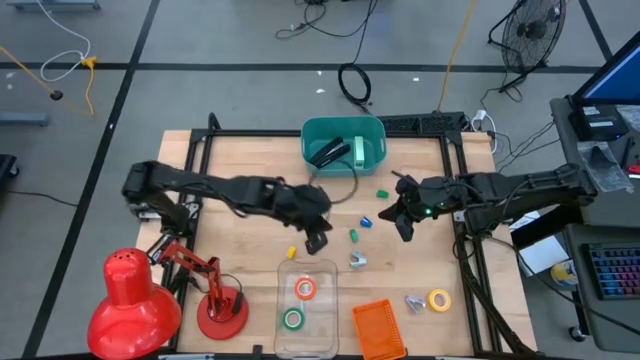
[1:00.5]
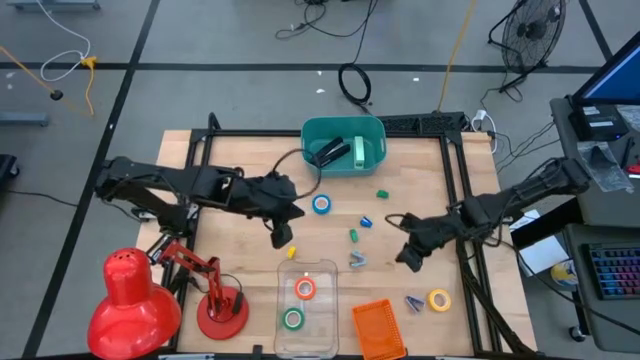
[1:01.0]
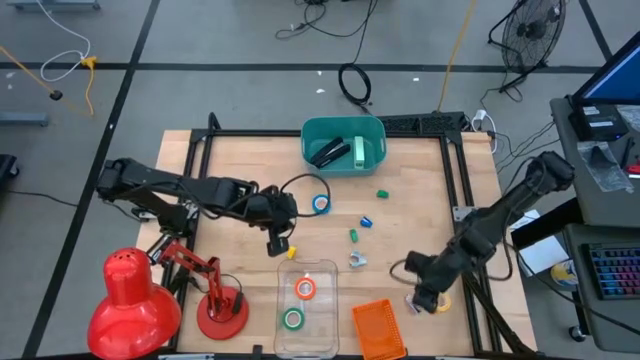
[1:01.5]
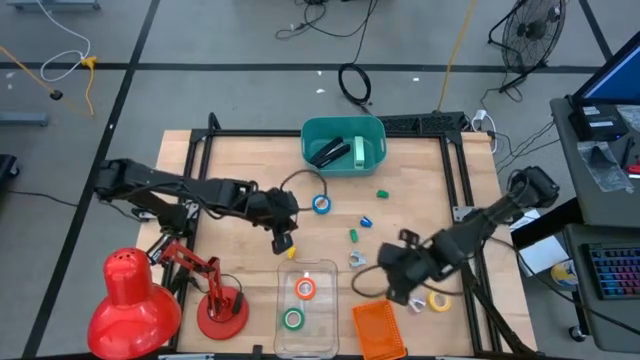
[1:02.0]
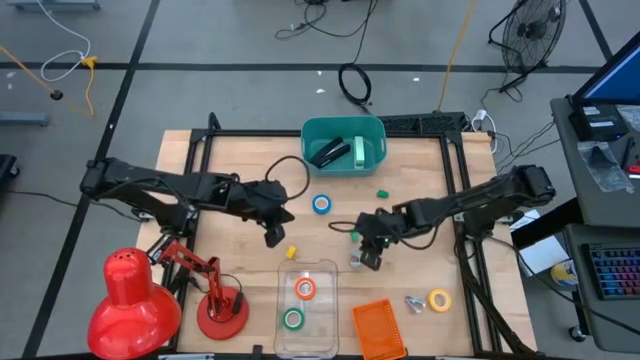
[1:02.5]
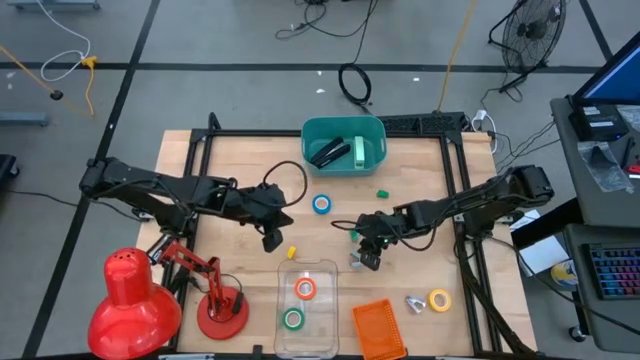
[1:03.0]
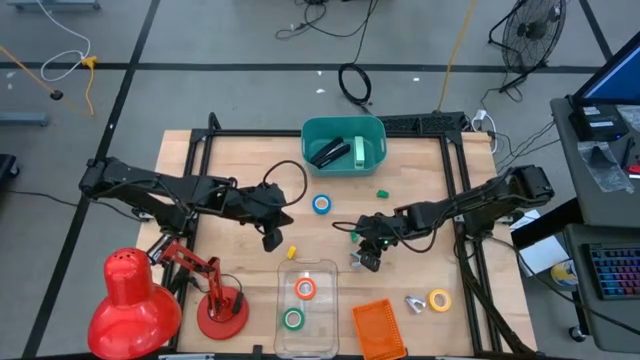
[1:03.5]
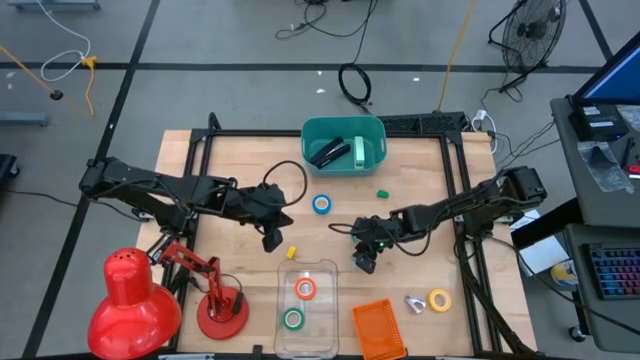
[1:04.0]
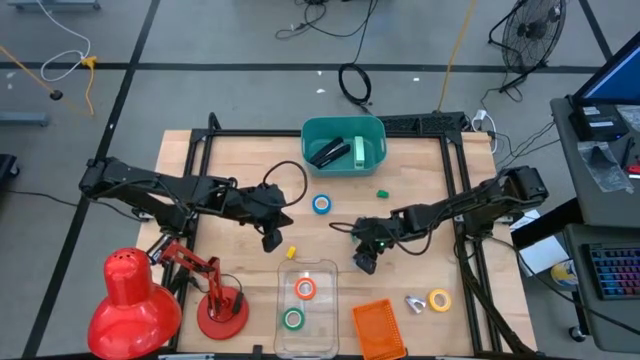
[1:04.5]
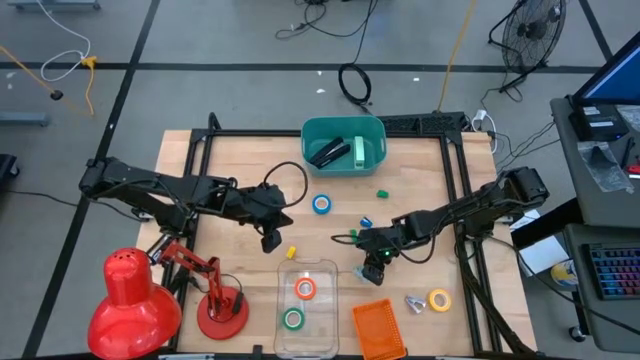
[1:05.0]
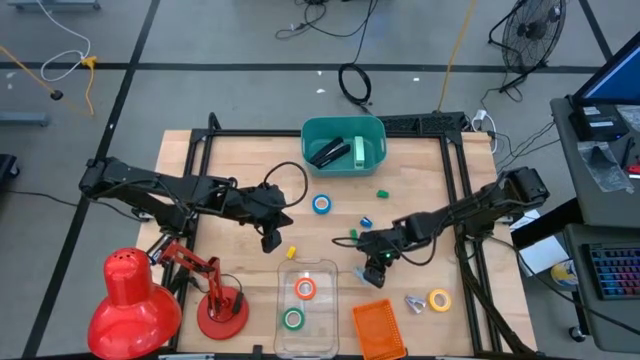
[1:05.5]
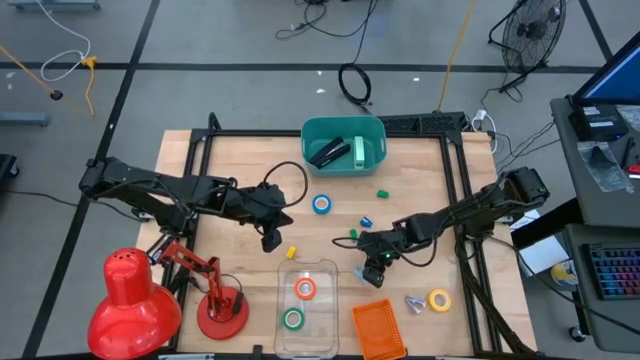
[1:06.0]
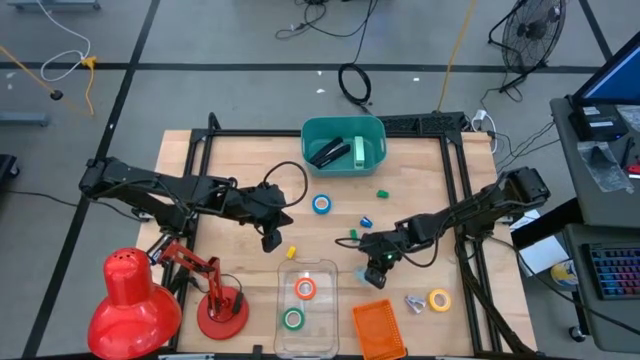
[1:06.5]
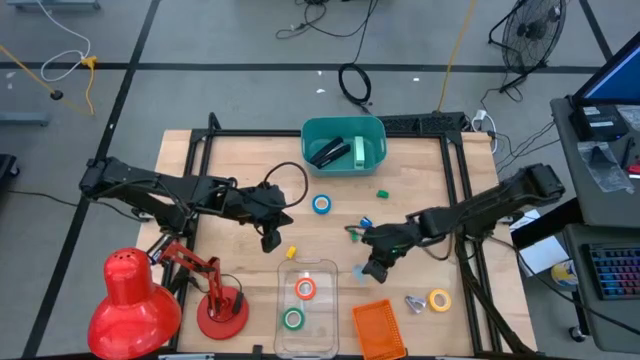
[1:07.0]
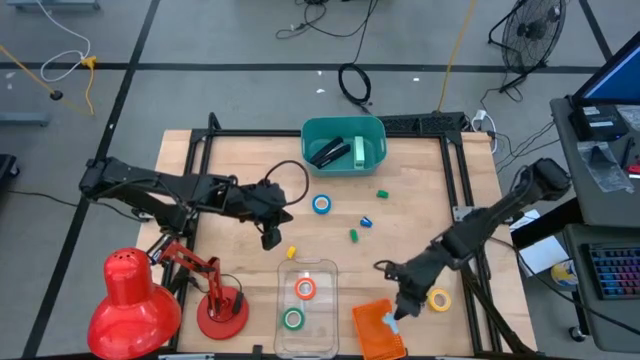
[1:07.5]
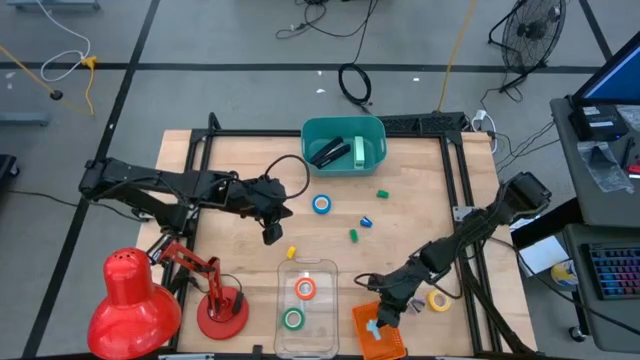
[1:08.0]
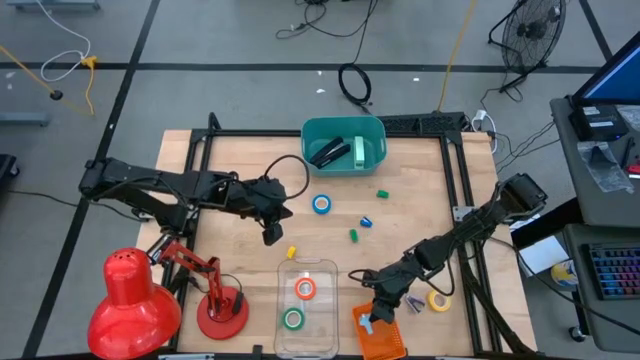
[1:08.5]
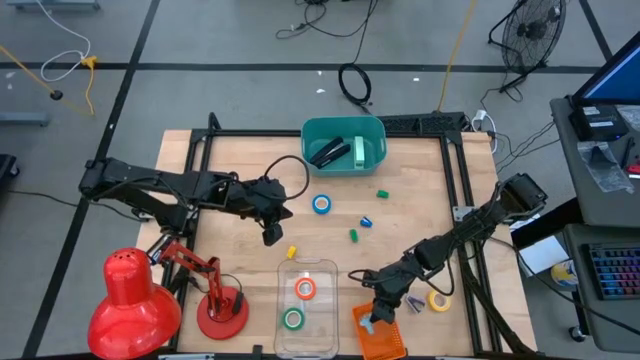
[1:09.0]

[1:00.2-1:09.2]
Task: Pick and place Stapler, Stapler remover, tape
Put the blue staple remover into the orange basket

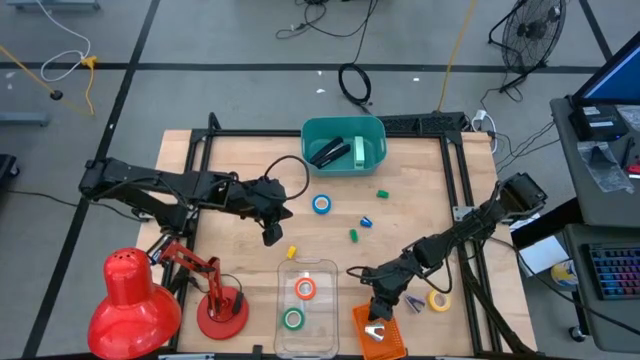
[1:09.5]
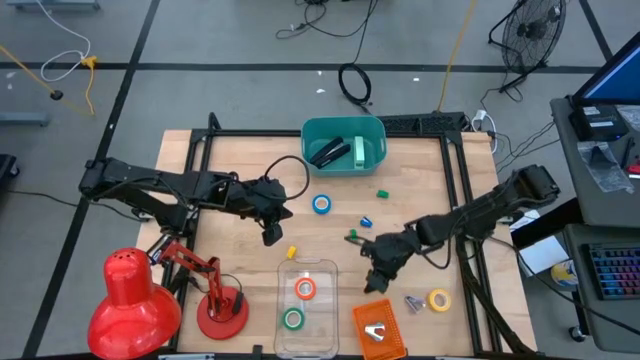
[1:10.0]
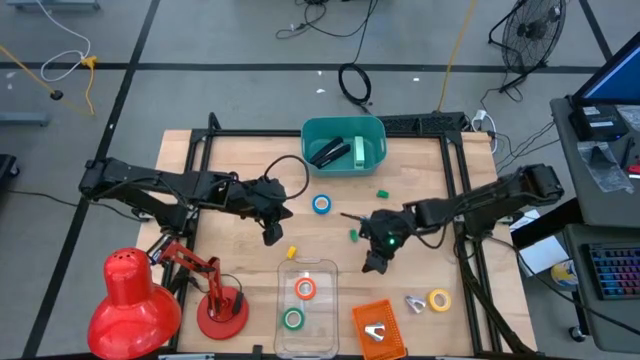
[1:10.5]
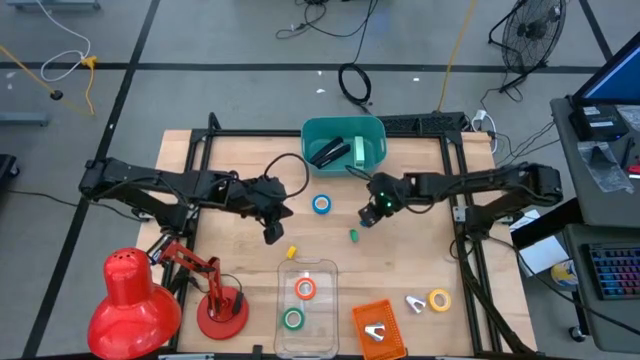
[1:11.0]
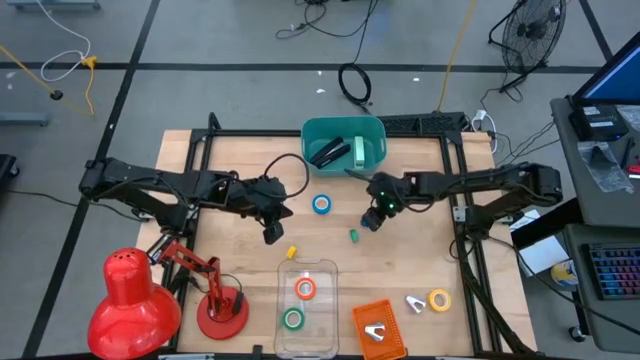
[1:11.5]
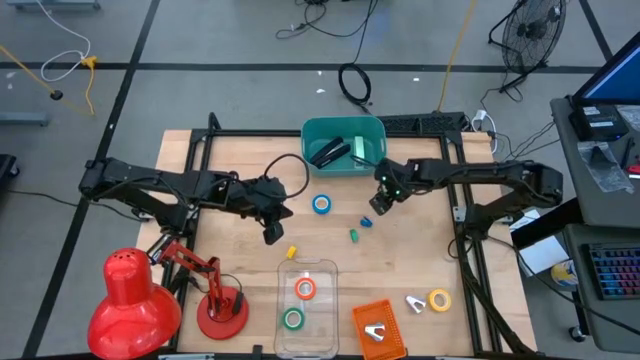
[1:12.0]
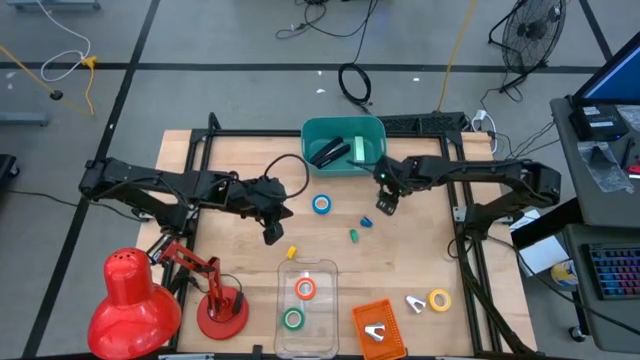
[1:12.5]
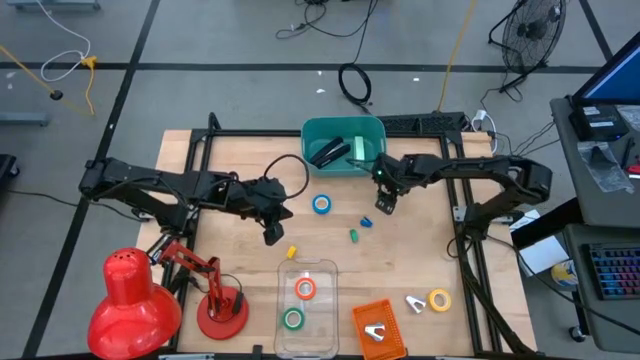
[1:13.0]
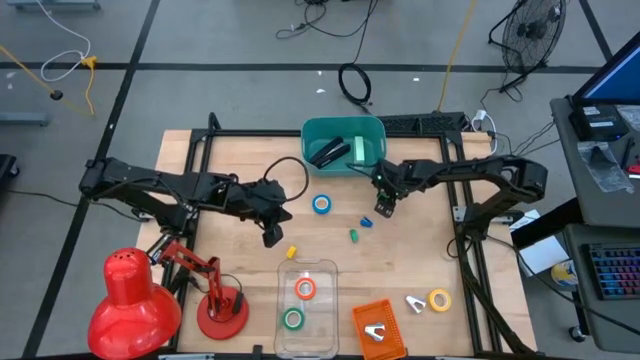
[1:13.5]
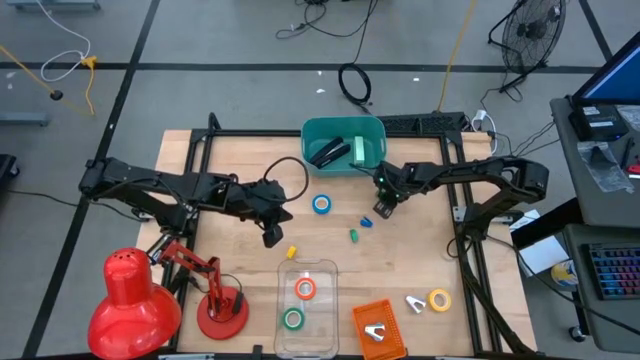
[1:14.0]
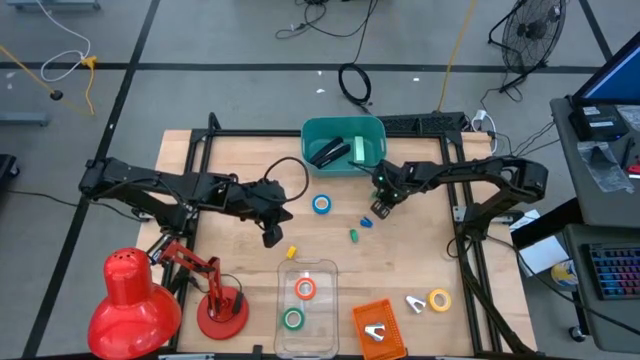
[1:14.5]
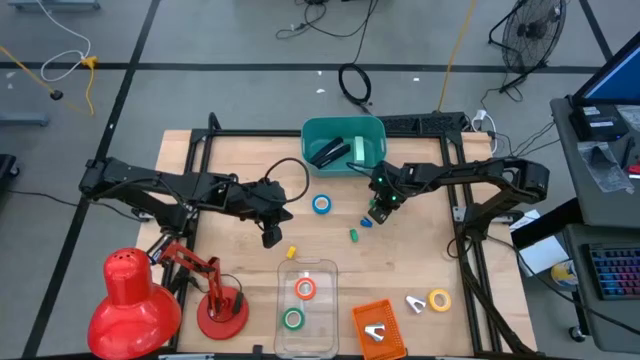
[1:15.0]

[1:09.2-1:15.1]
Put the top green small stapler into the green bin

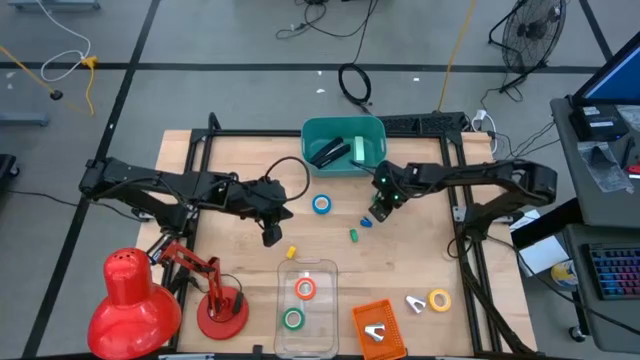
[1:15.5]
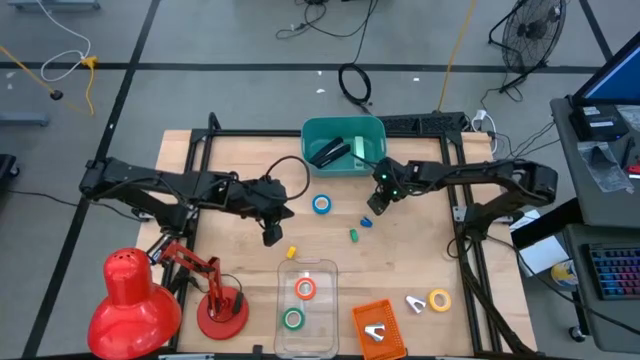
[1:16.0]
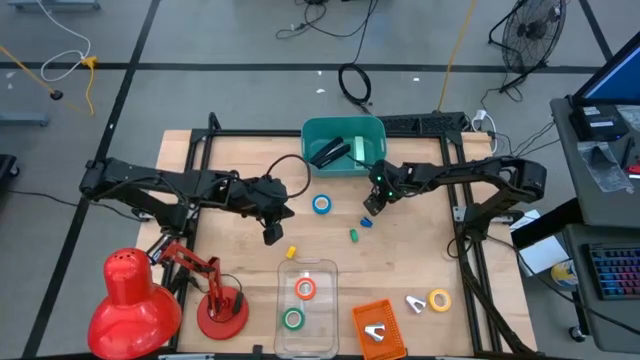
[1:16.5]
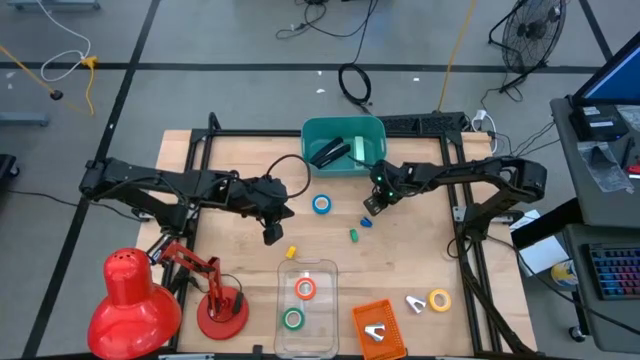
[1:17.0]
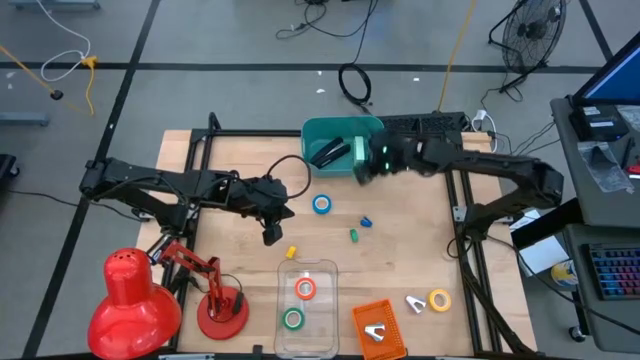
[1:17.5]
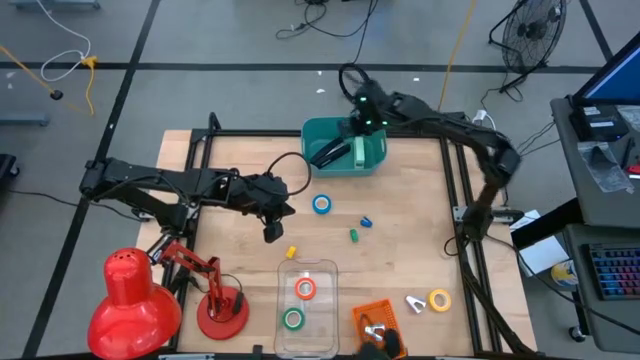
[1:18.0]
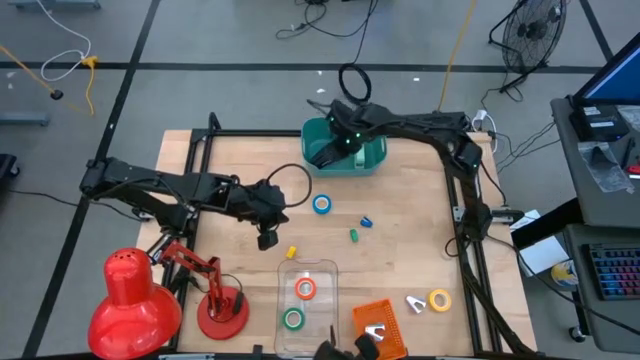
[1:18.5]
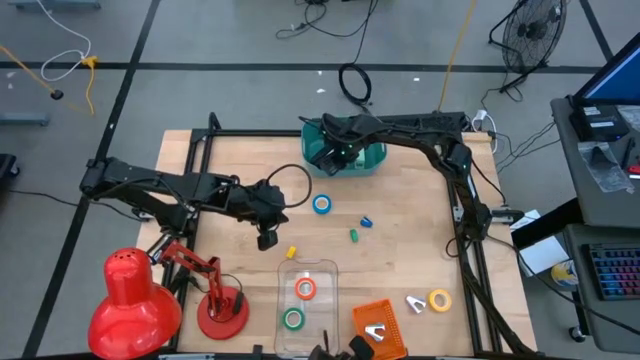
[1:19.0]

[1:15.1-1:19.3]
Put the top green stapler into the green bin

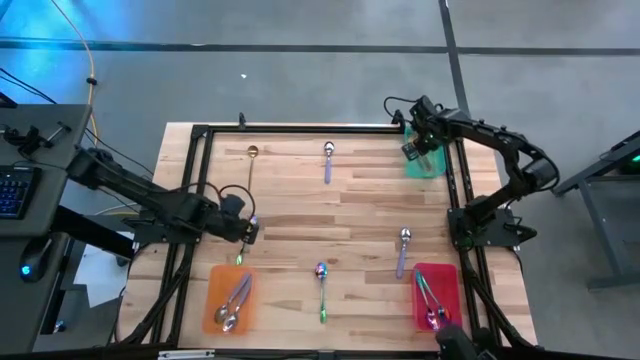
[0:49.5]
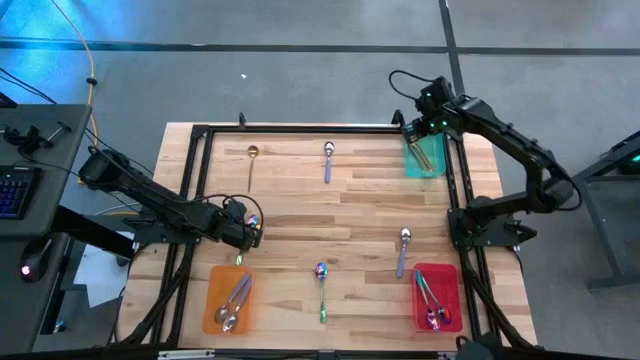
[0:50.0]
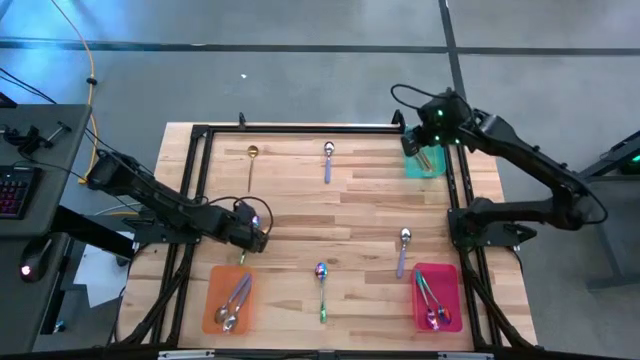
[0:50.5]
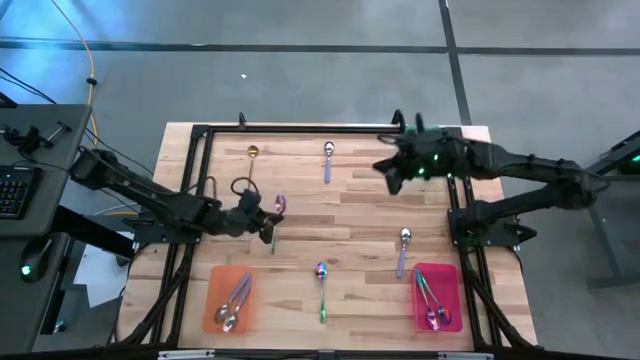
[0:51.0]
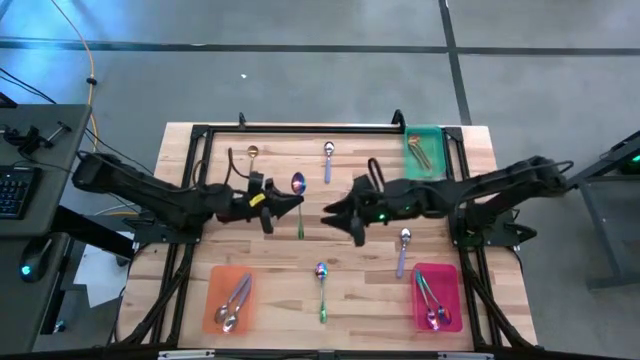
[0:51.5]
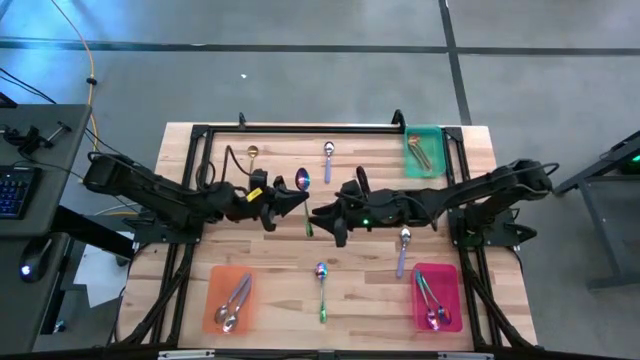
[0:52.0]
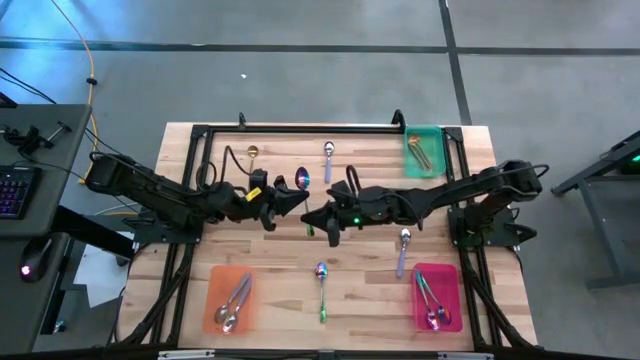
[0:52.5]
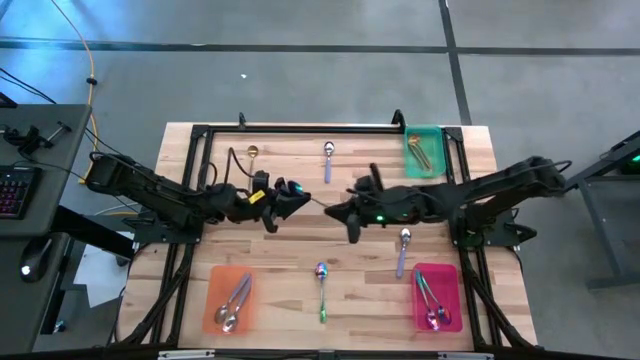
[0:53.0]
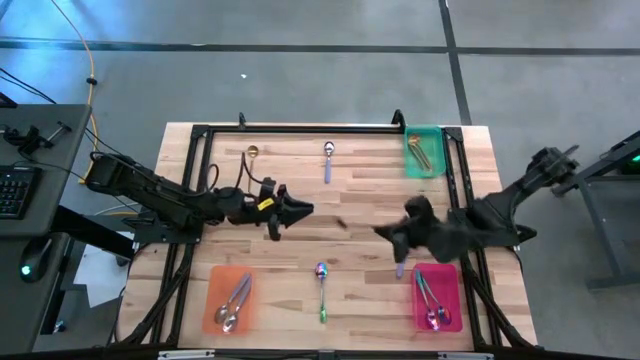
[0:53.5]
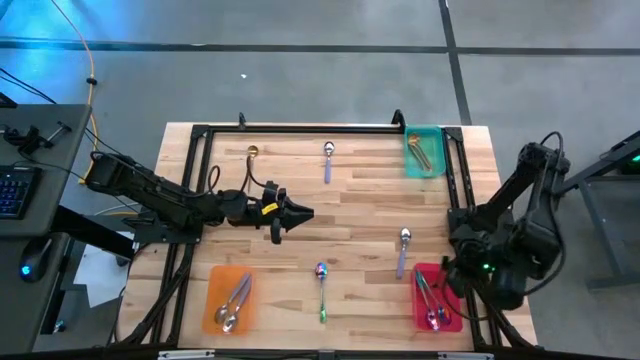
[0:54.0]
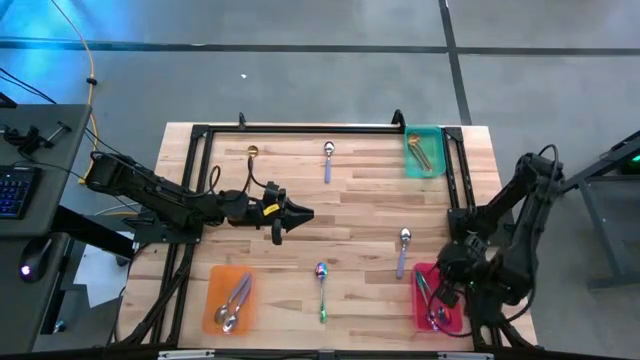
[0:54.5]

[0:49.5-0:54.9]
Task: Sort silverware by color (type)
Put the blue spoon into the red bin
